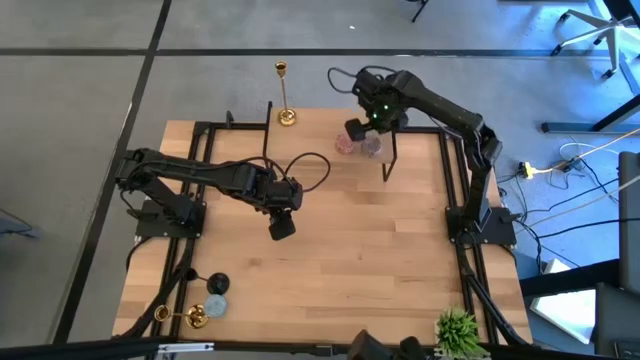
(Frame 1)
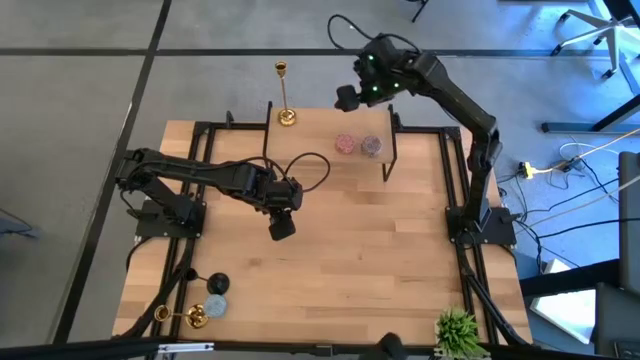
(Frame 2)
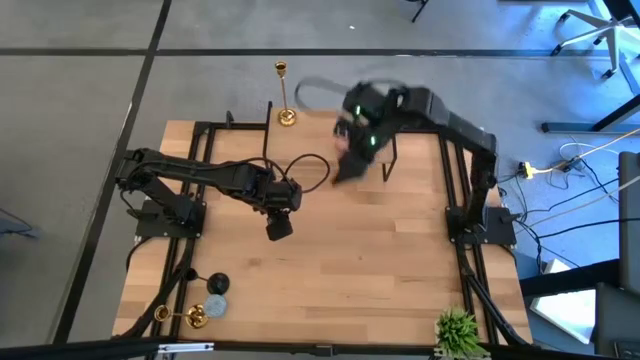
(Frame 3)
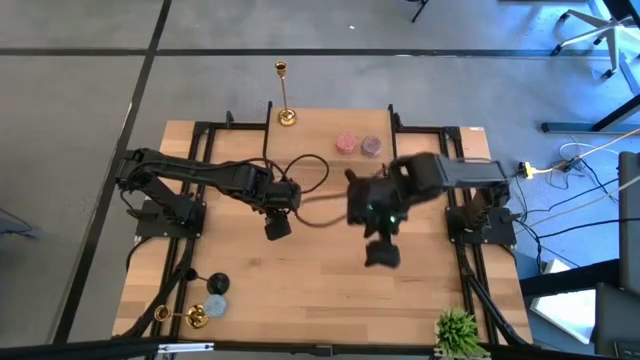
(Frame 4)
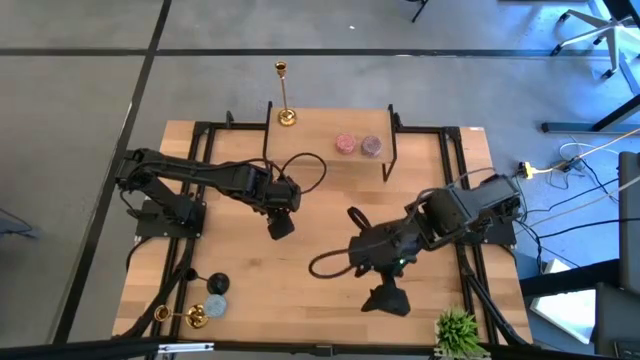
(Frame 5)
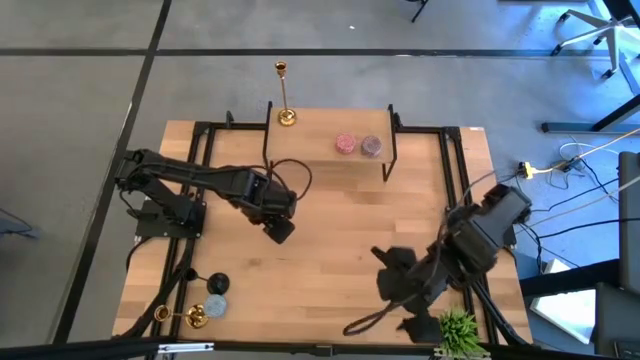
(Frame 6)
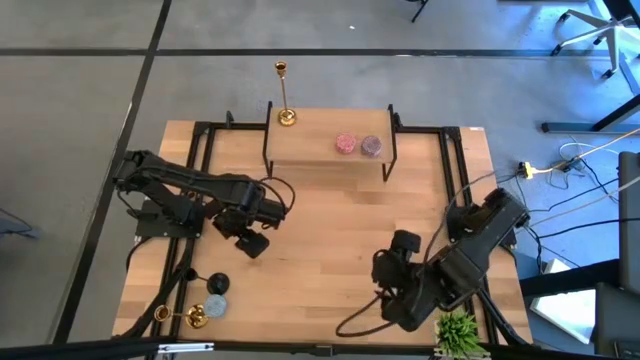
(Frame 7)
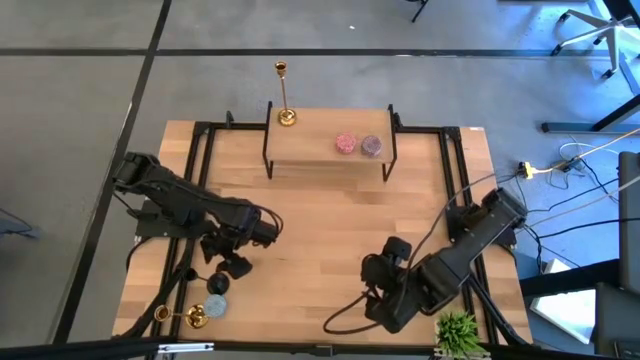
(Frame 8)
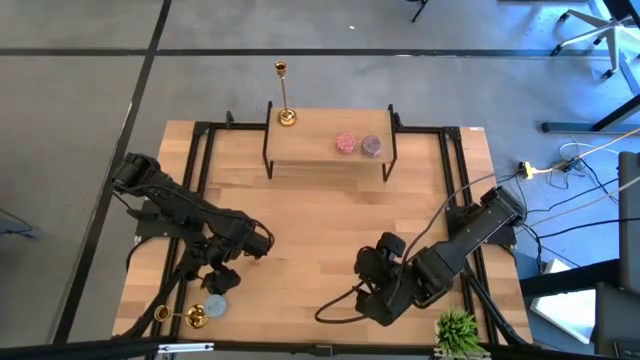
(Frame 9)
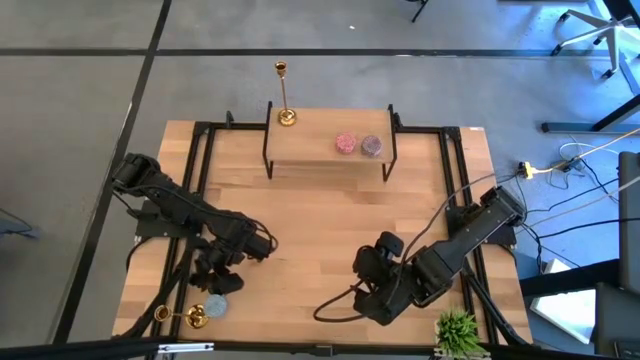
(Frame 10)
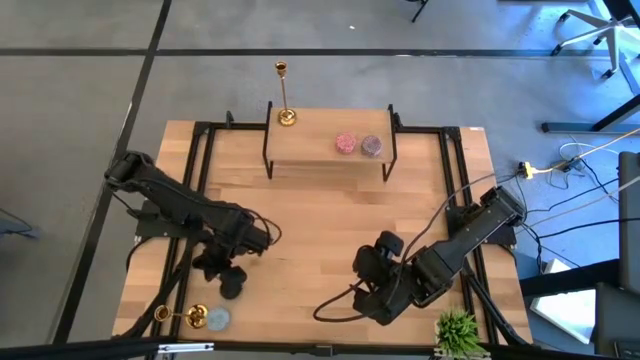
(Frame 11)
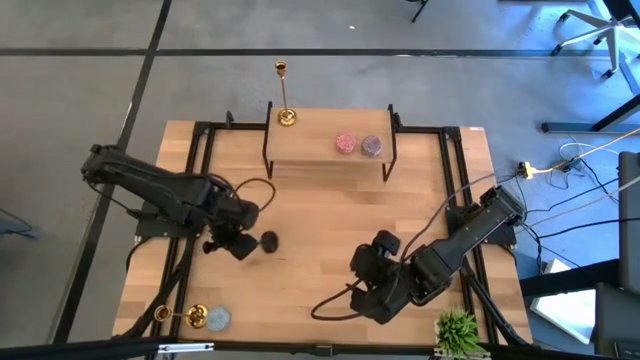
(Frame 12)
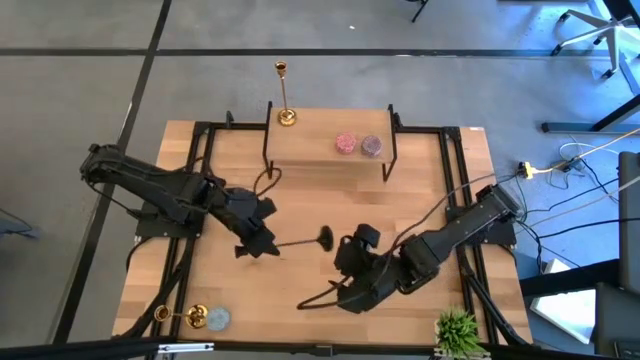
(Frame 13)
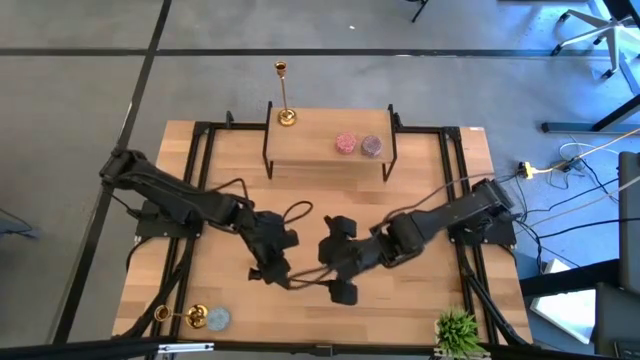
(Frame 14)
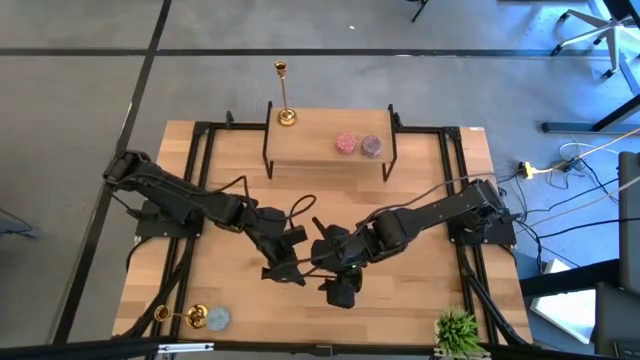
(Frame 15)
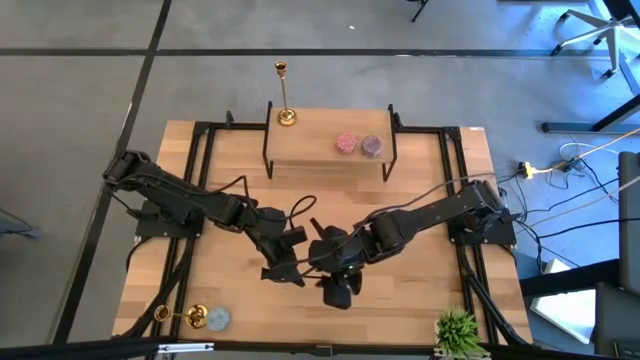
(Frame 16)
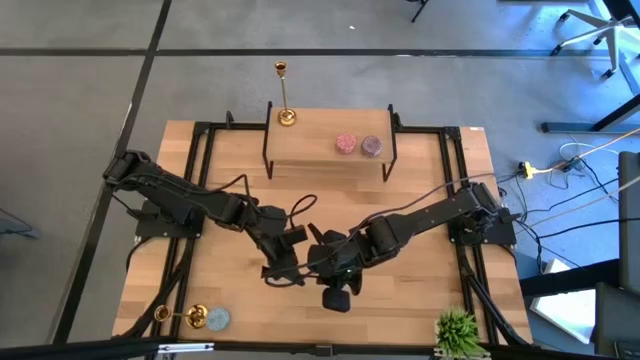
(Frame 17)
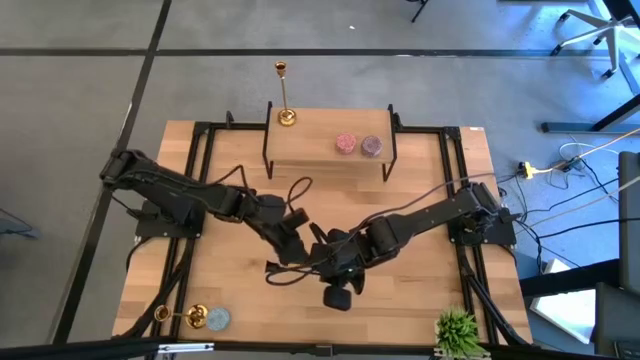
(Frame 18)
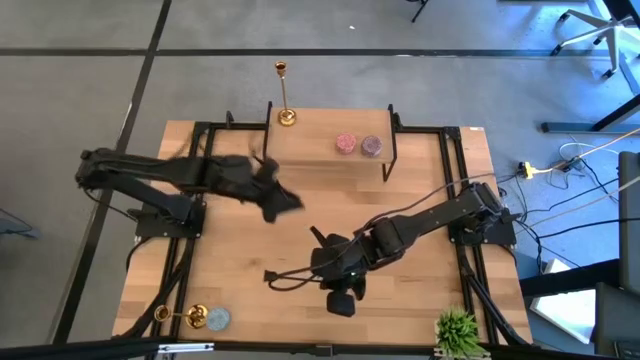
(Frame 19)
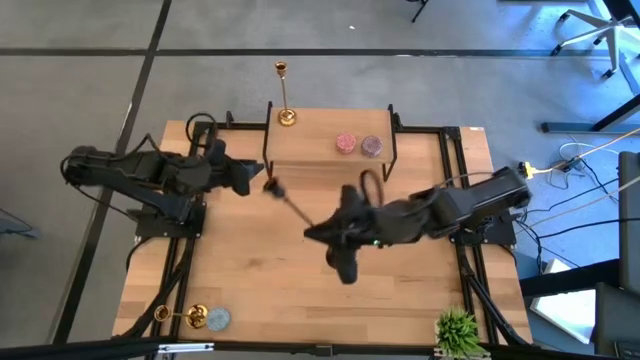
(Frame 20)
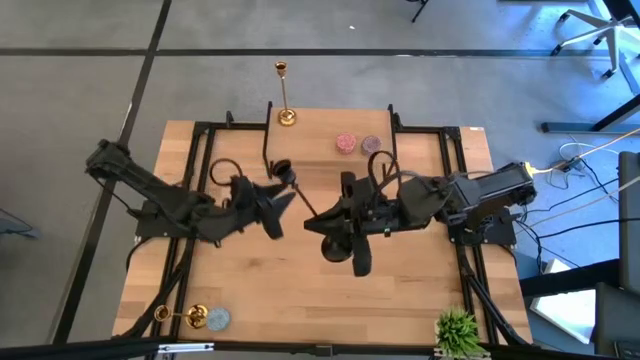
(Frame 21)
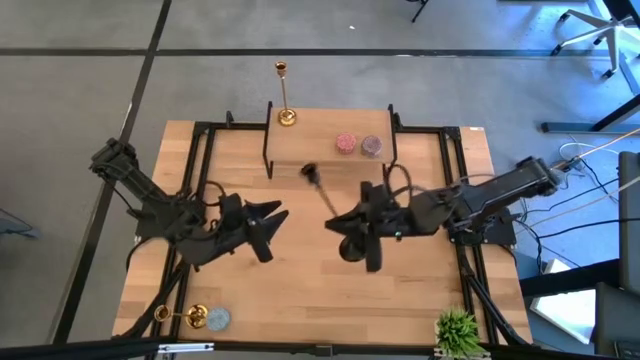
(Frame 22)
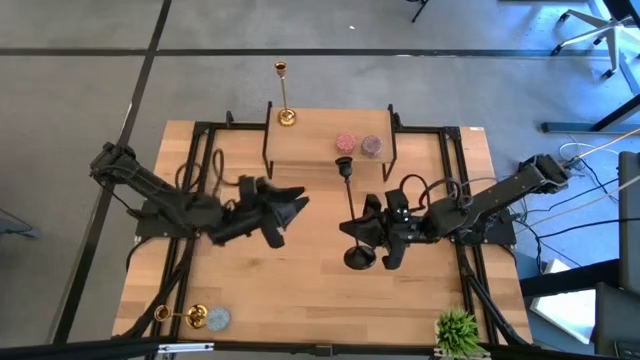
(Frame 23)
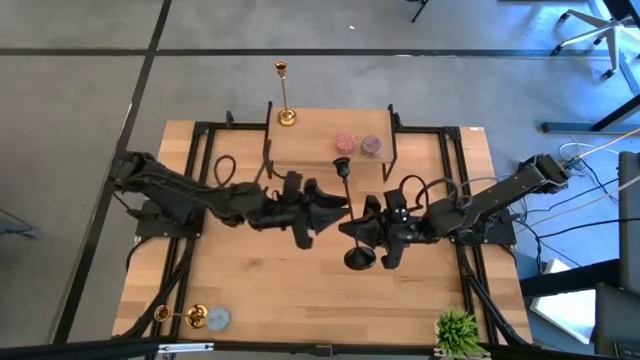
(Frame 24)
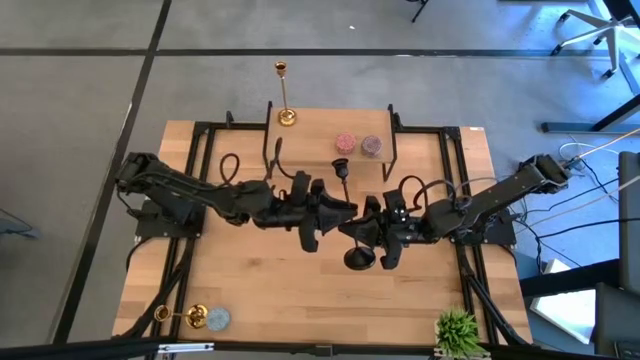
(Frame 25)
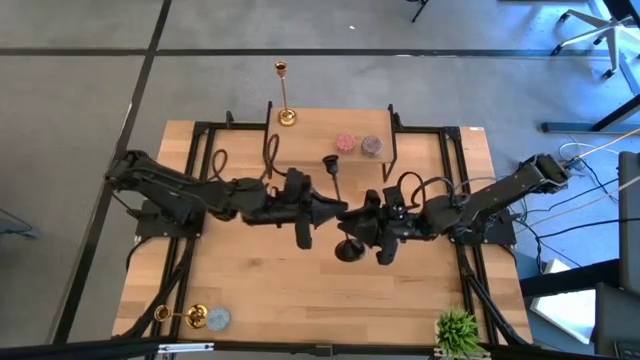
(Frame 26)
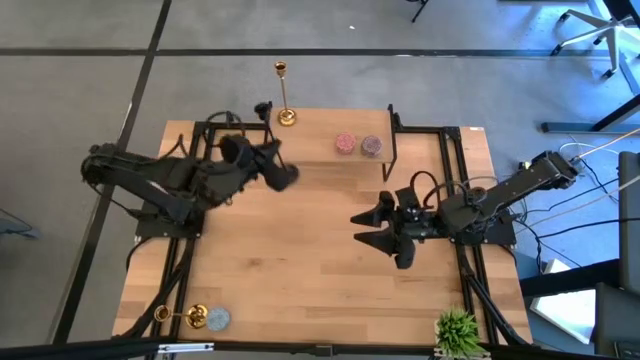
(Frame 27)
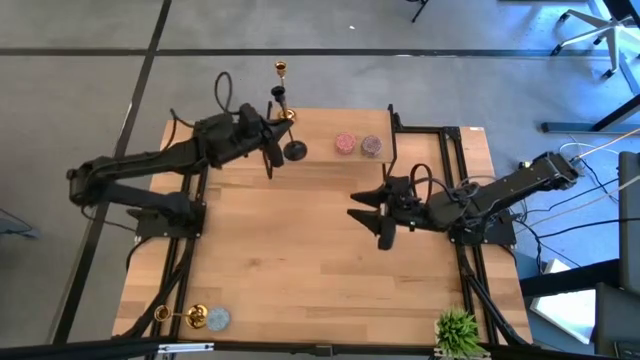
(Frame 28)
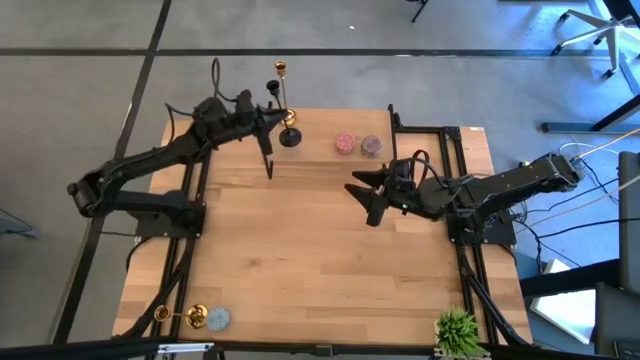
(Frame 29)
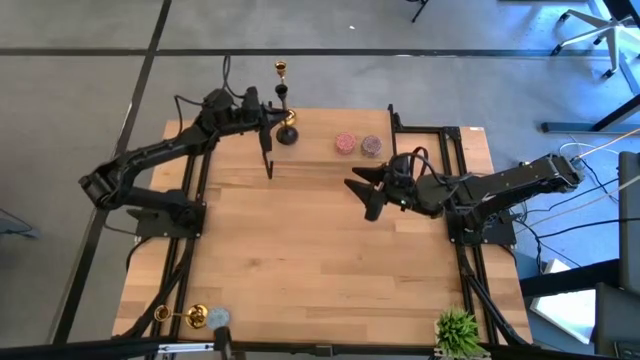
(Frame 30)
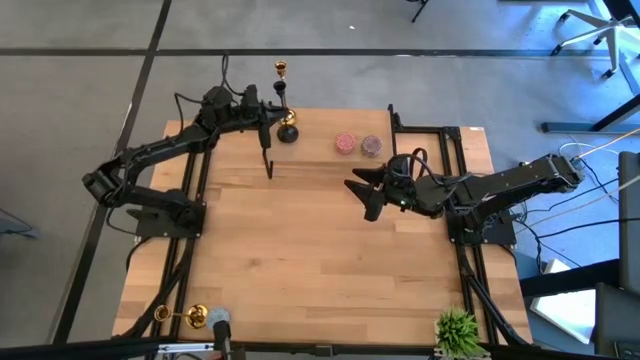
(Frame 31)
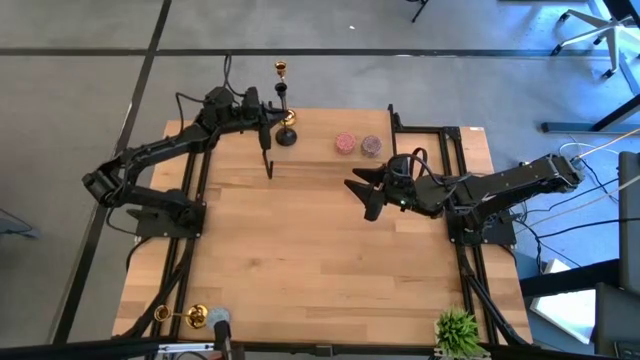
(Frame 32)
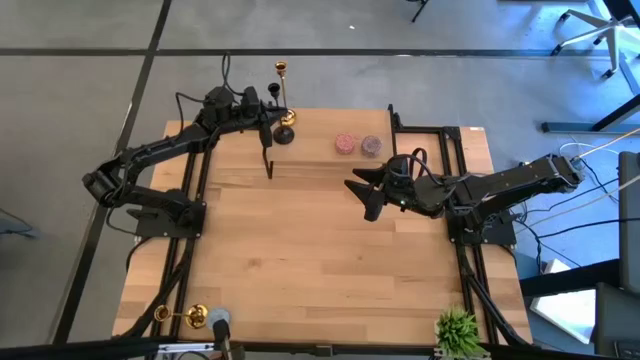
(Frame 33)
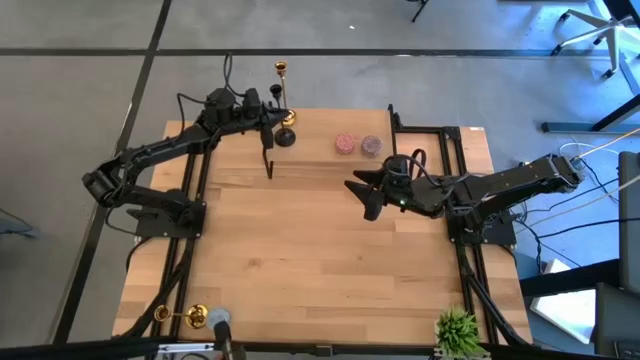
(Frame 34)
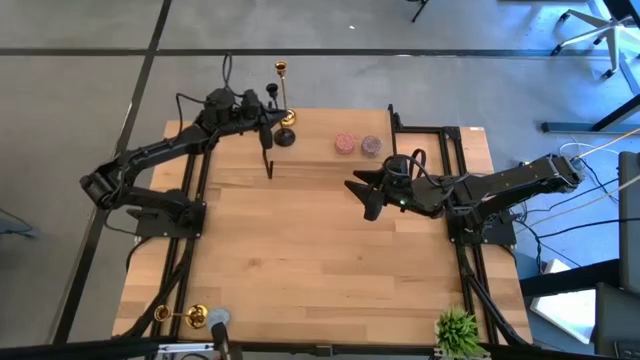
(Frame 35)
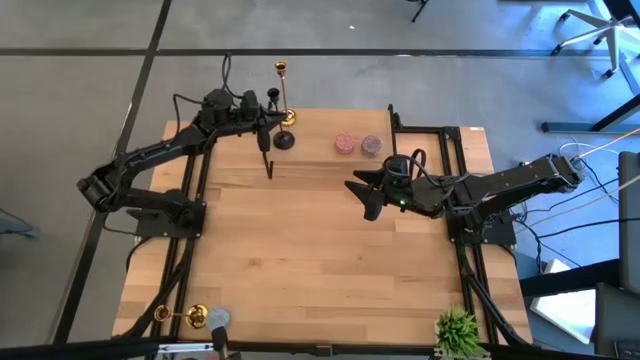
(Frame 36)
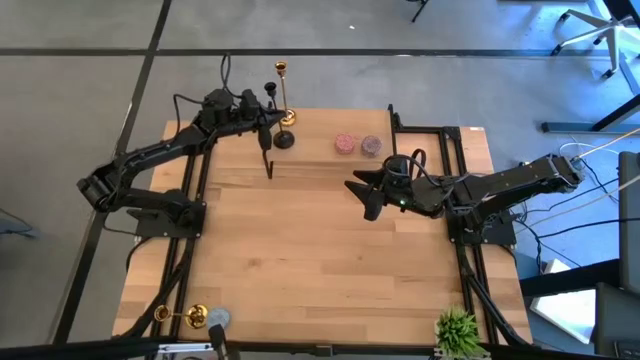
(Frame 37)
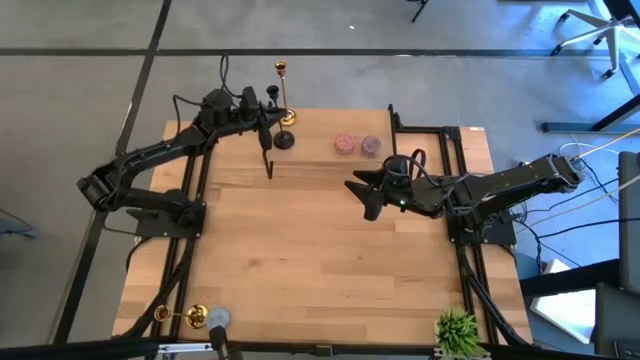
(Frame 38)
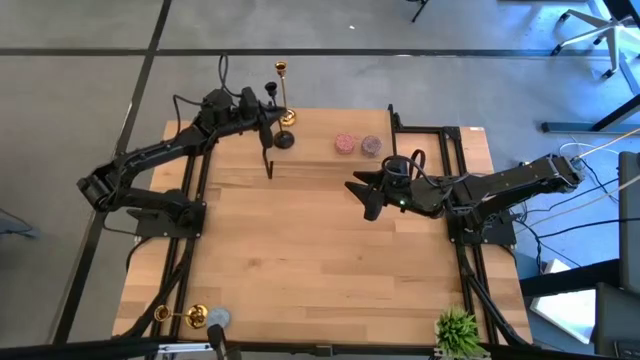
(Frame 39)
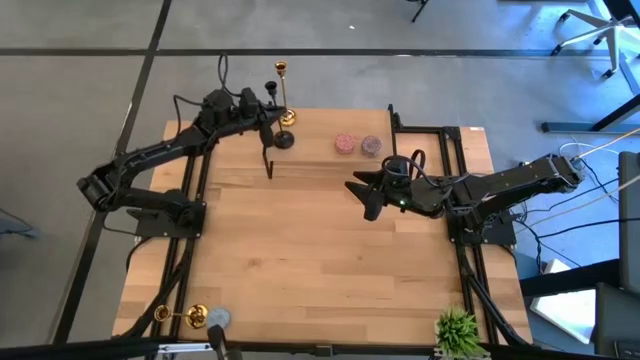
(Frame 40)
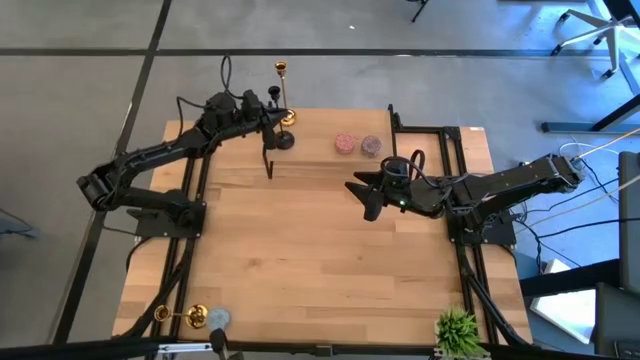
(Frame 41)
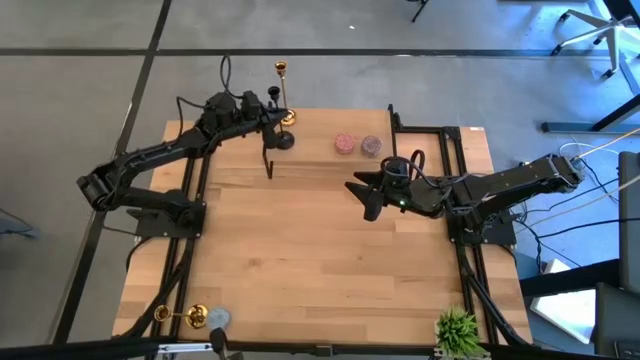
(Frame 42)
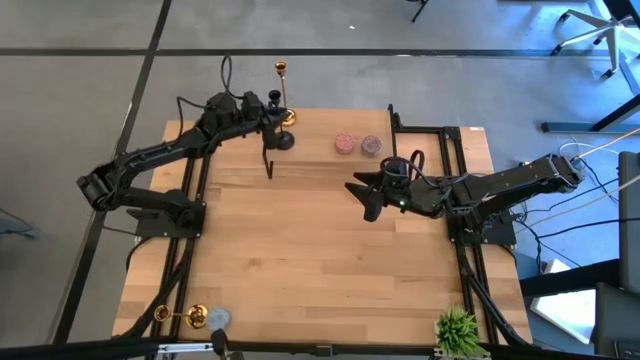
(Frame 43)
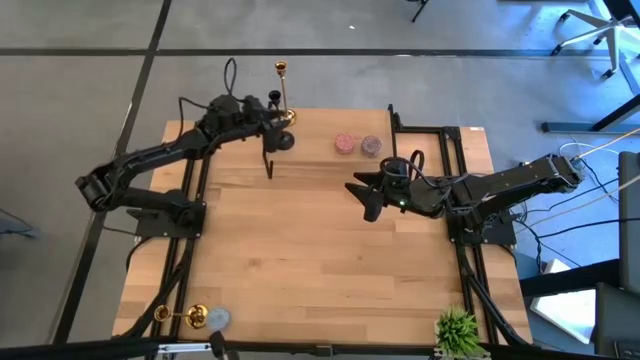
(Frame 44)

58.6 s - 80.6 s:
Task: Pick & Place candle stick holders
Put the black brass candlestick on the shelf
